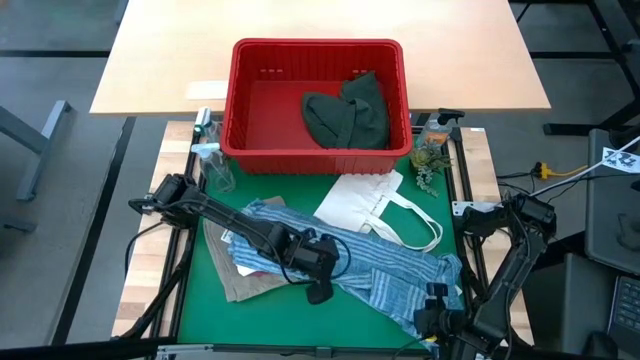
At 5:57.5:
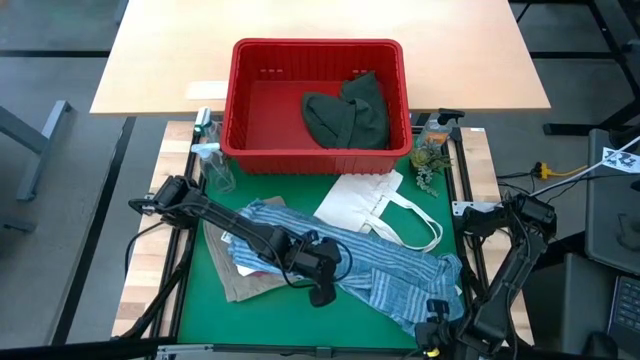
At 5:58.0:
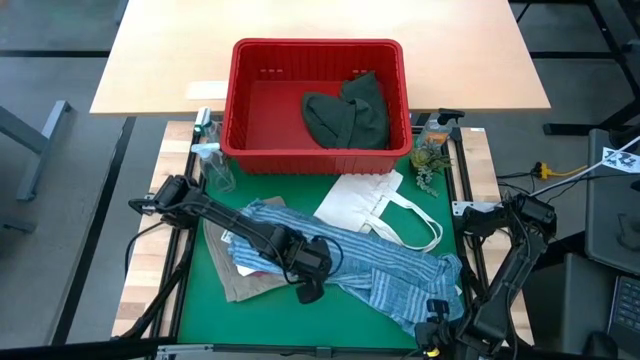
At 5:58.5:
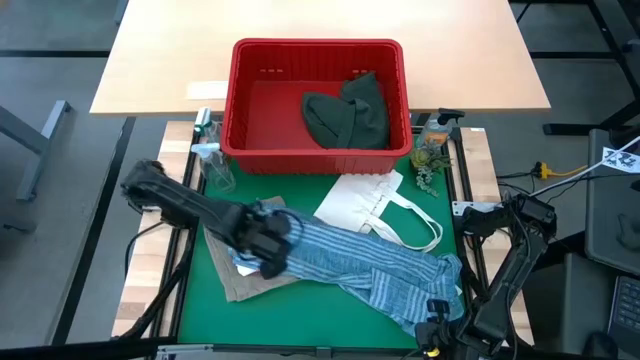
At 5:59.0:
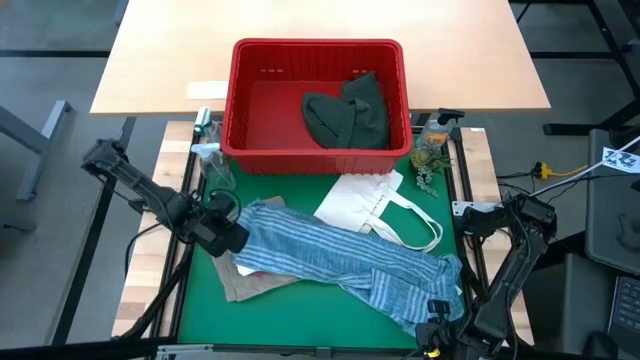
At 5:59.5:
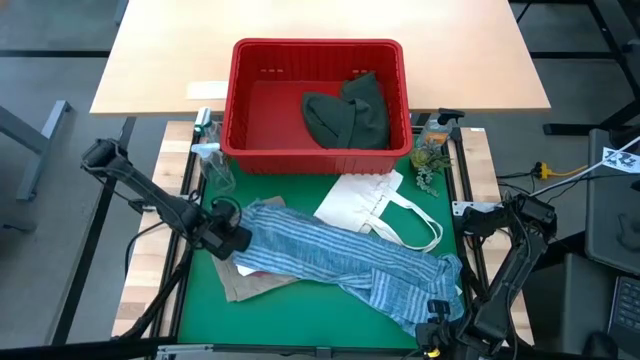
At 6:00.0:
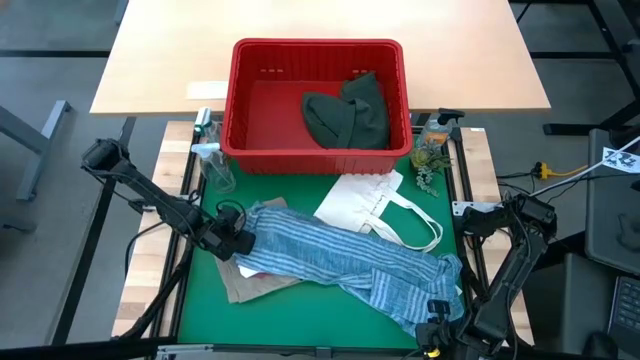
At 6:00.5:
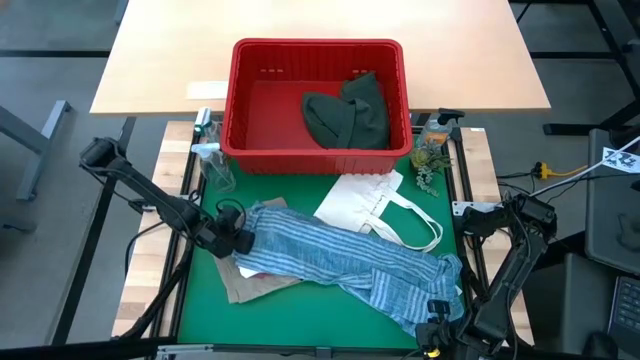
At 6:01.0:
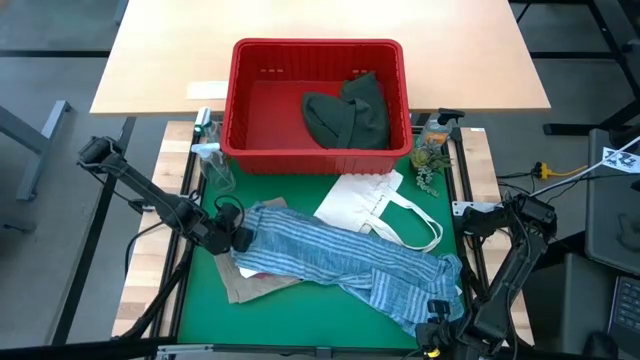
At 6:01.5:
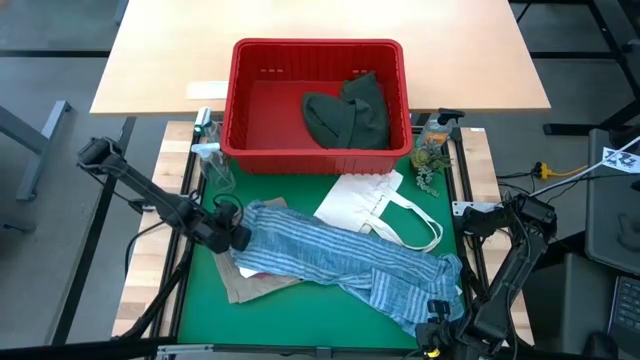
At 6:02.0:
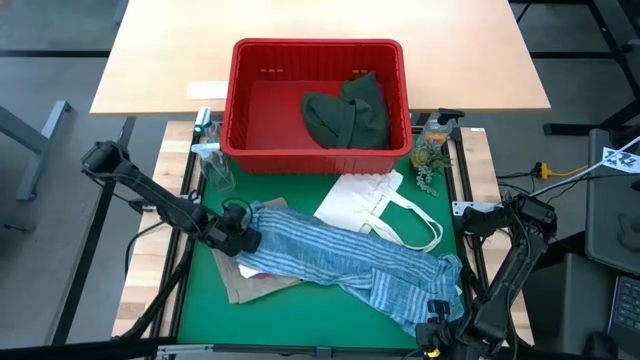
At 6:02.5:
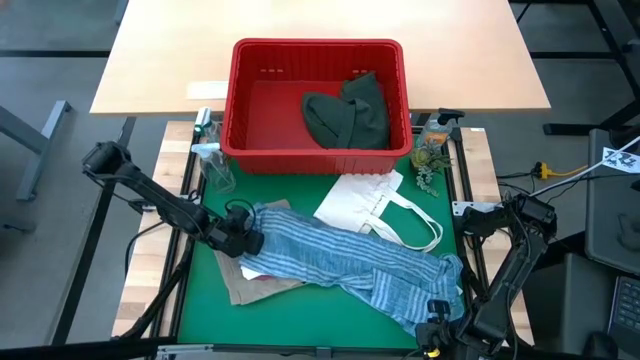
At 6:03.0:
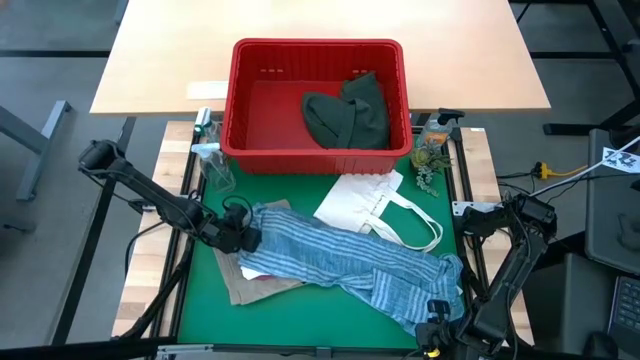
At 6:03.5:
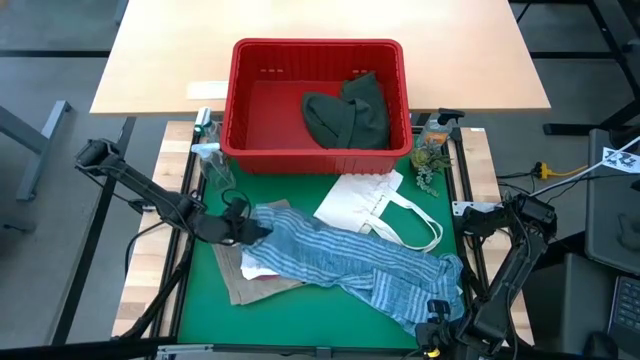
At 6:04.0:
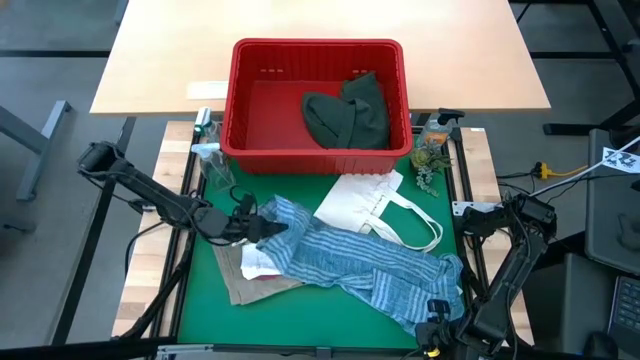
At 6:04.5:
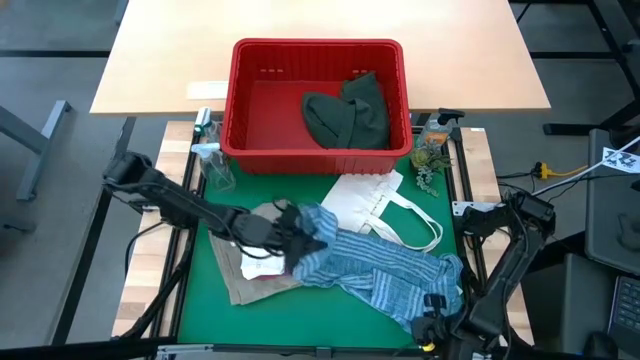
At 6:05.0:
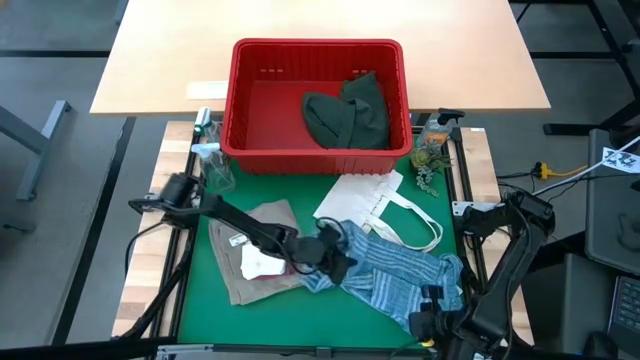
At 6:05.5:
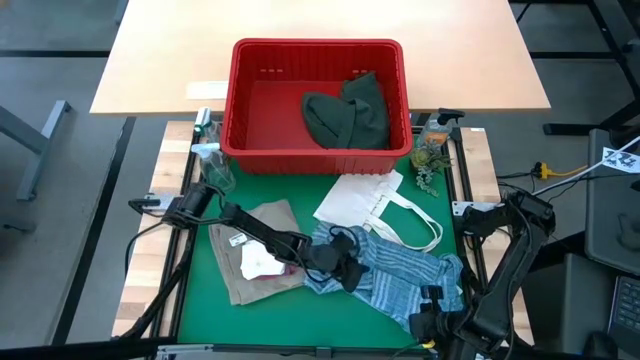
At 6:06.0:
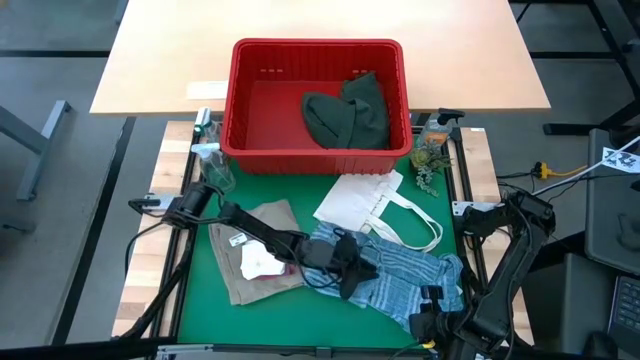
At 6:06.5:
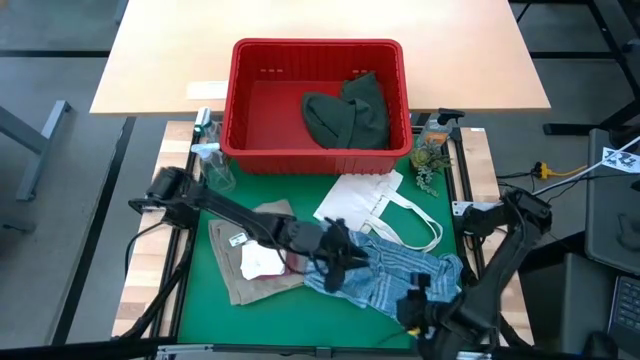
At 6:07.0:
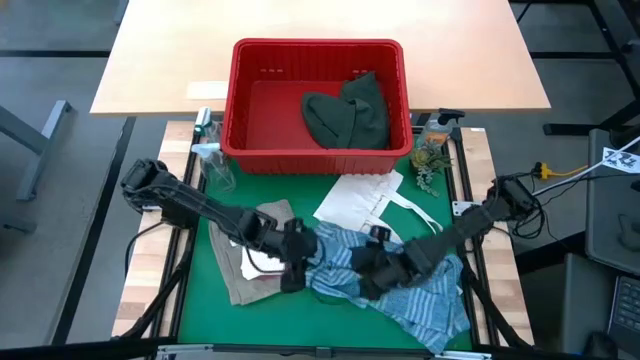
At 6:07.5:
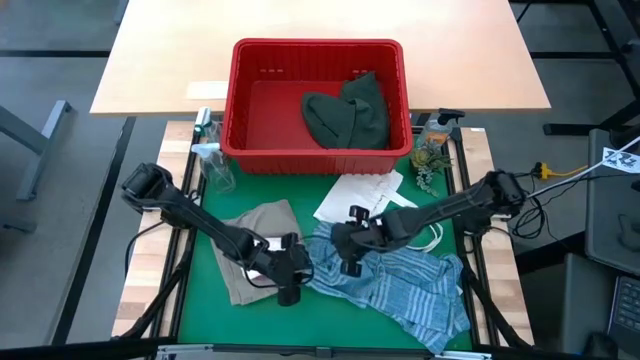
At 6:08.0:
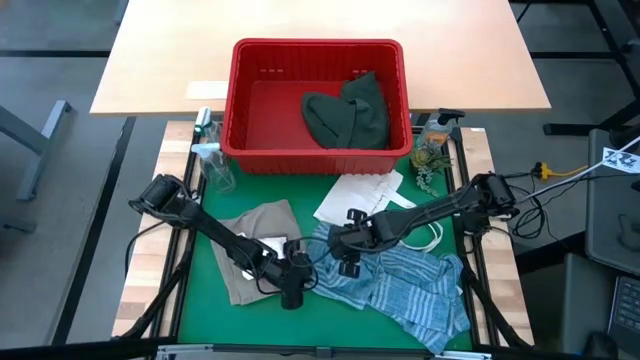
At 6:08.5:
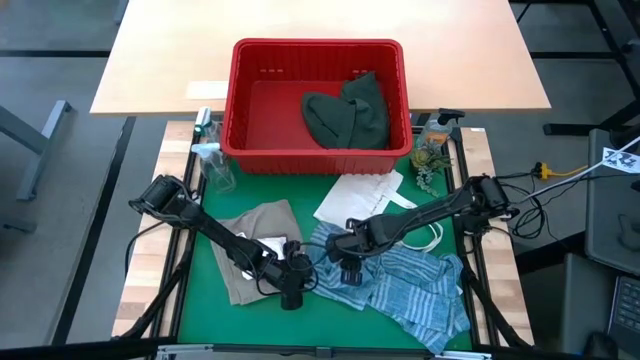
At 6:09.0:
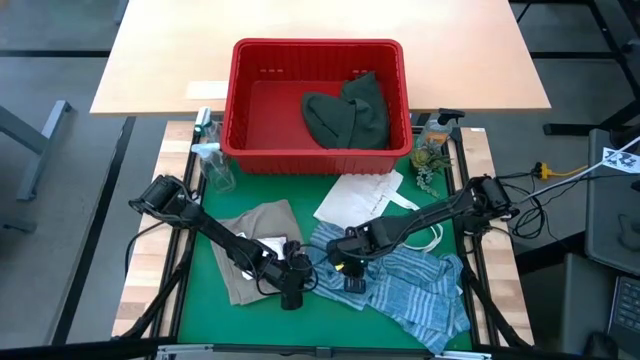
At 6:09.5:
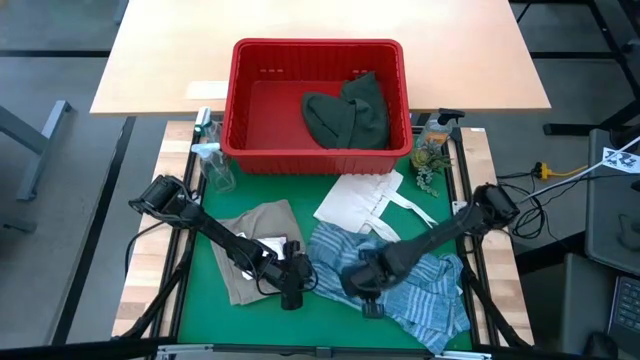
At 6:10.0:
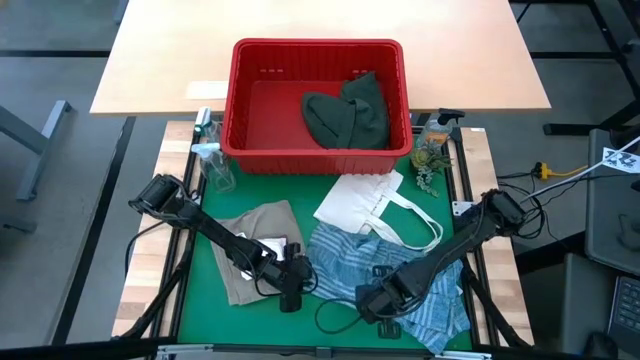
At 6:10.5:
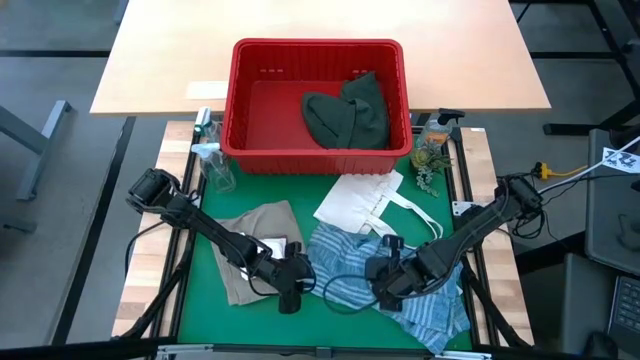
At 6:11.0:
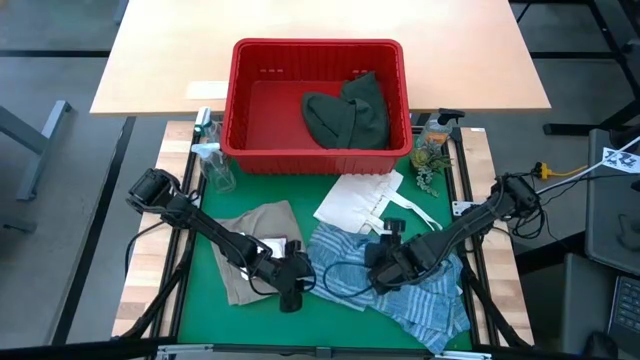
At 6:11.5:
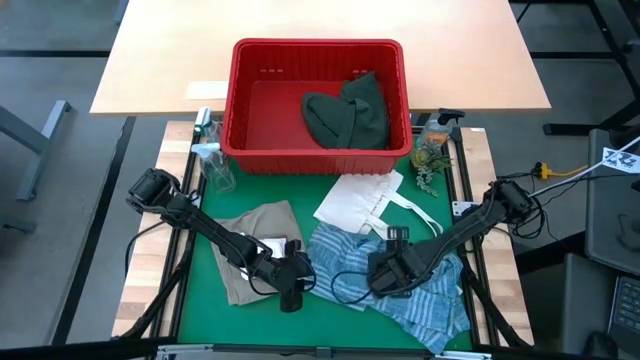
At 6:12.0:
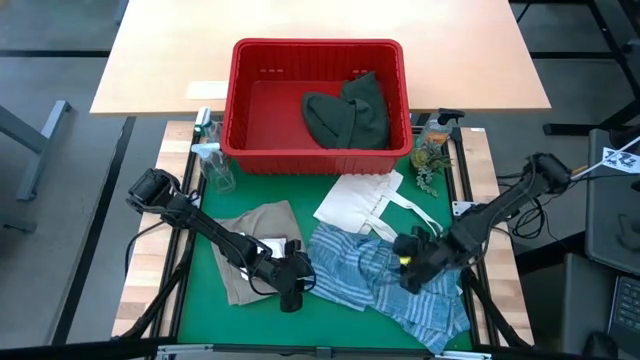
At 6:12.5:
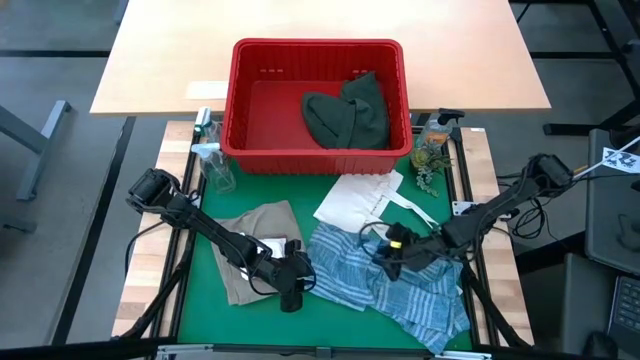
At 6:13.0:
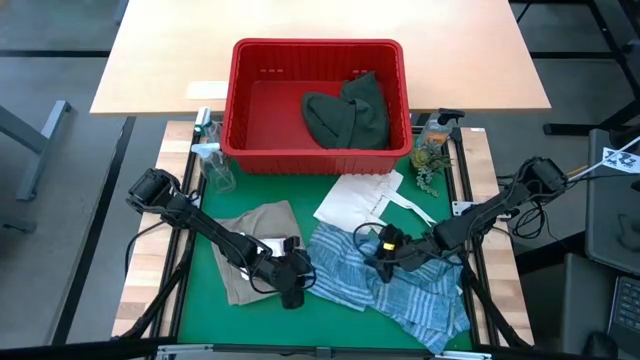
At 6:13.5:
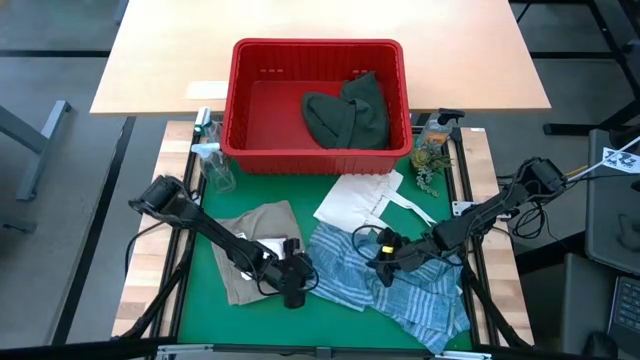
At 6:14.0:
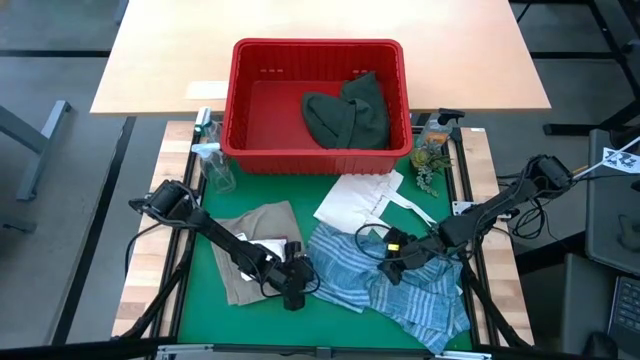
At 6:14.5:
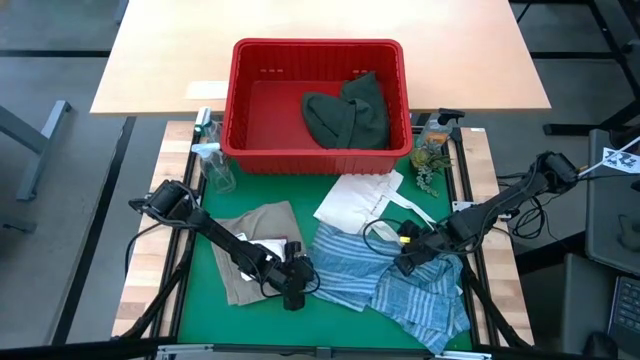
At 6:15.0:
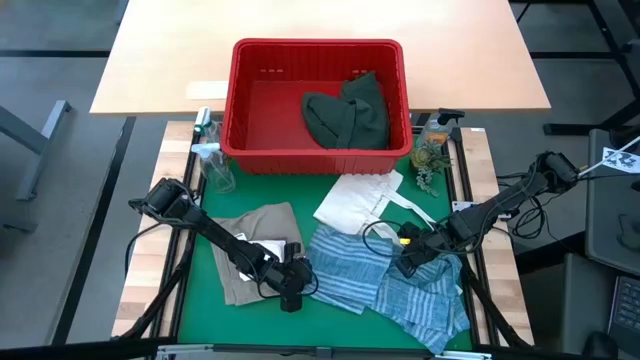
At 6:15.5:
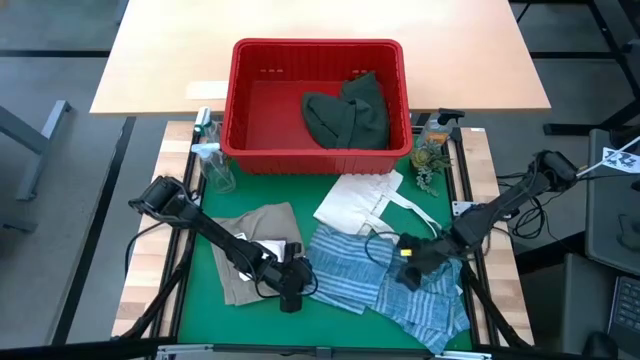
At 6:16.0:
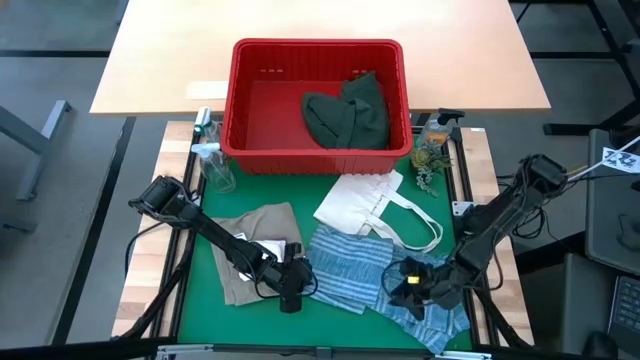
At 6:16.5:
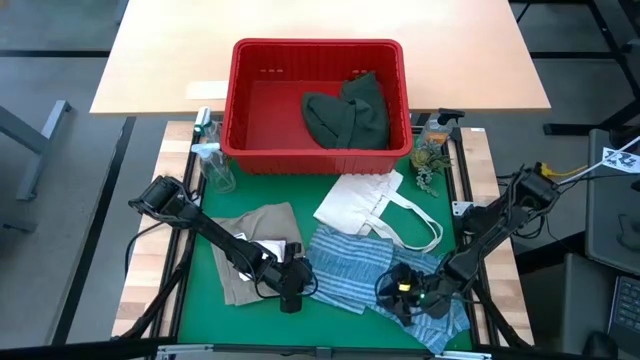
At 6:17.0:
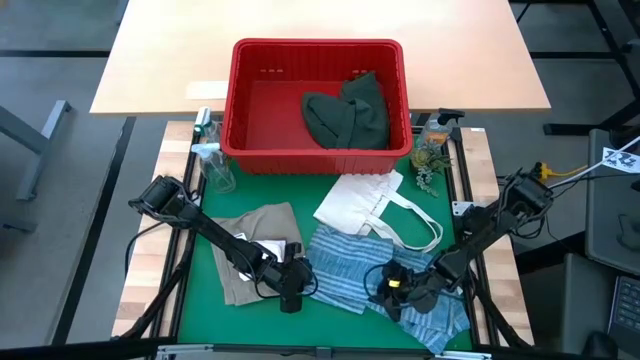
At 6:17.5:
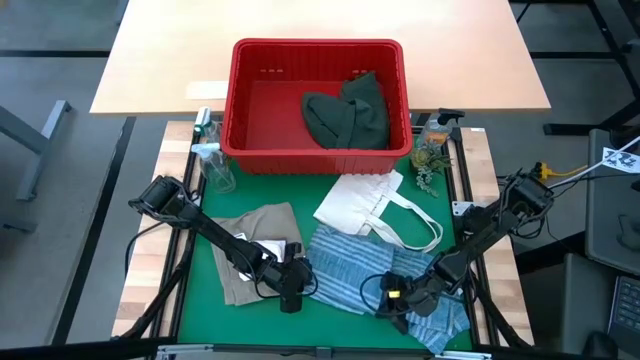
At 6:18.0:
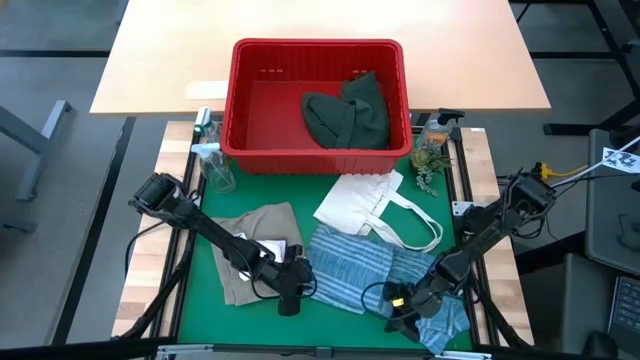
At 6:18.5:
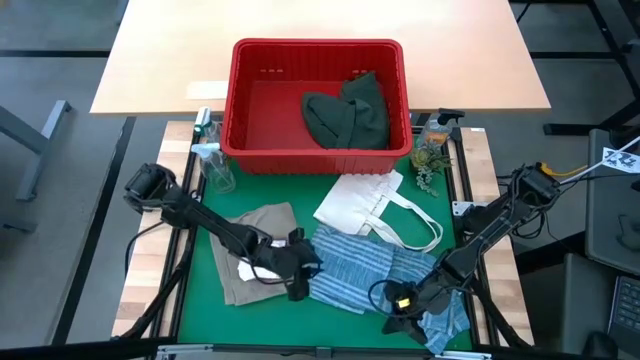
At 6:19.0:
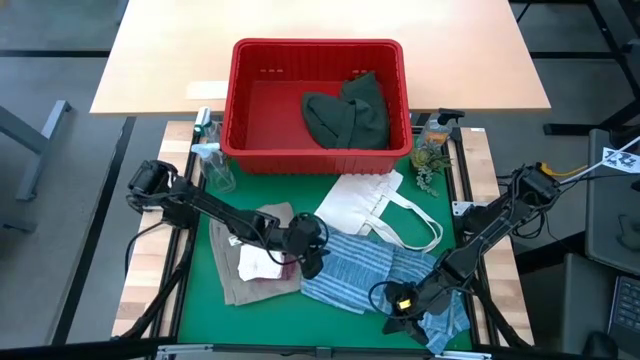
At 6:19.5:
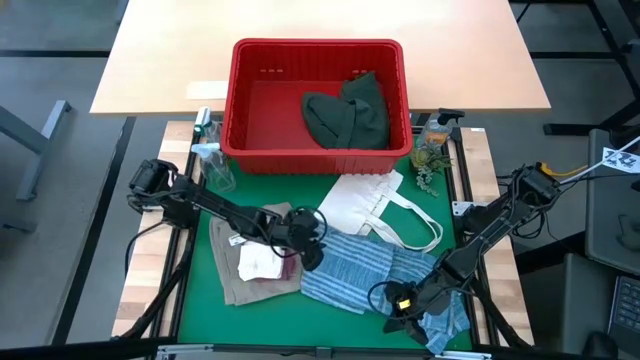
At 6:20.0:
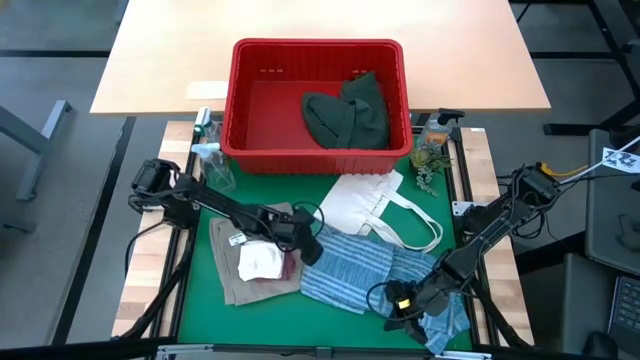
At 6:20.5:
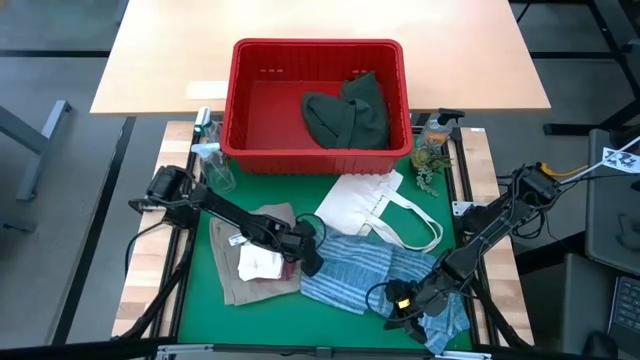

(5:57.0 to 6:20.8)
Task: Fold Laundry from Bin
Fold the blue polo shirt
